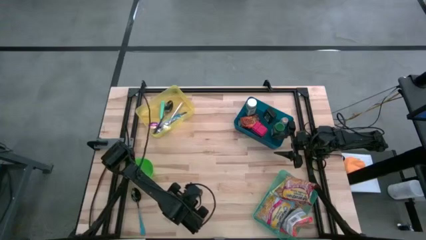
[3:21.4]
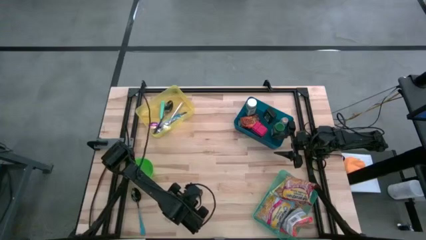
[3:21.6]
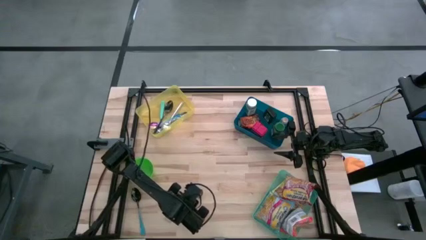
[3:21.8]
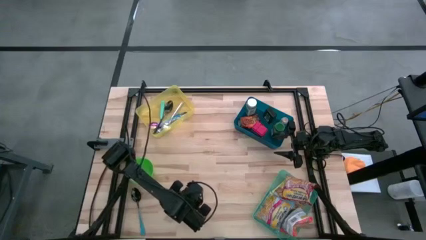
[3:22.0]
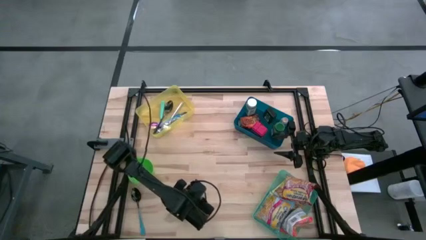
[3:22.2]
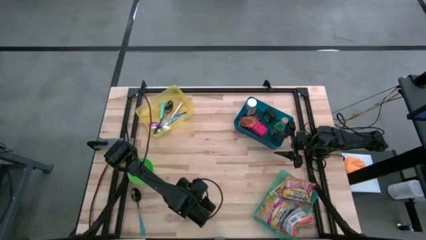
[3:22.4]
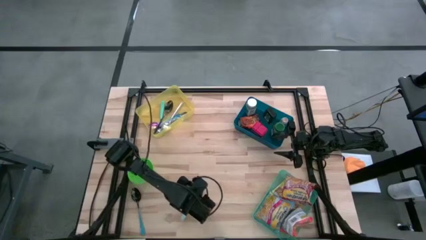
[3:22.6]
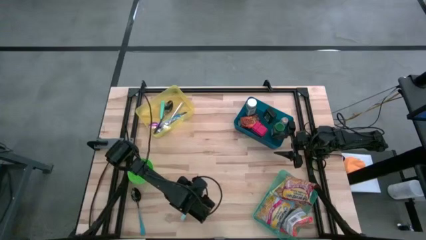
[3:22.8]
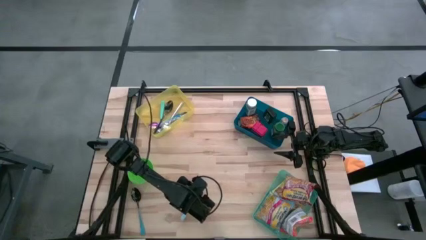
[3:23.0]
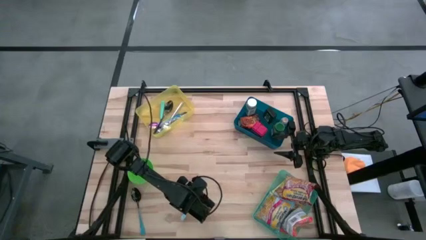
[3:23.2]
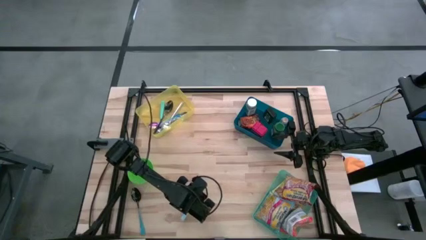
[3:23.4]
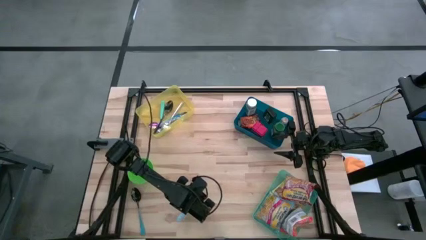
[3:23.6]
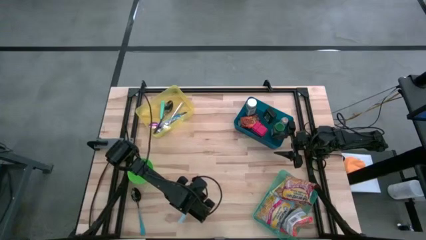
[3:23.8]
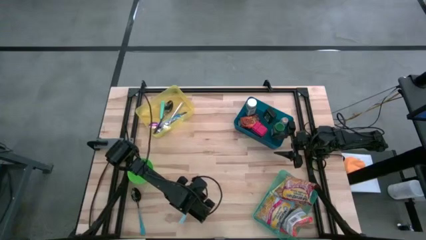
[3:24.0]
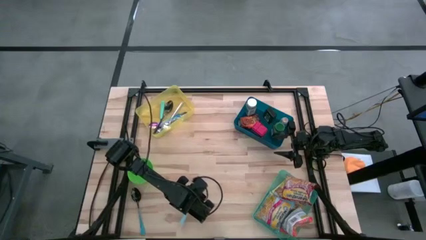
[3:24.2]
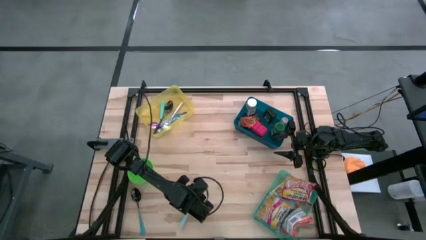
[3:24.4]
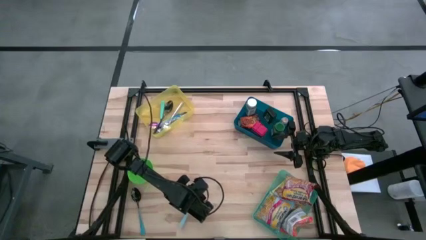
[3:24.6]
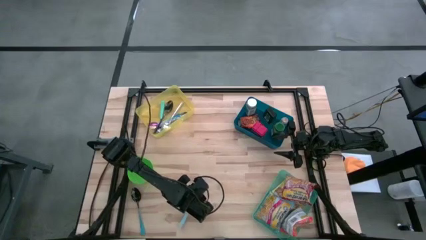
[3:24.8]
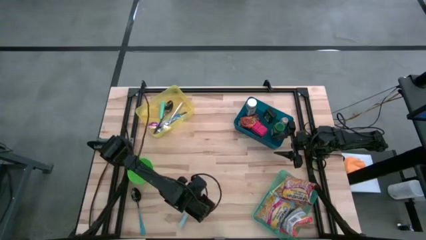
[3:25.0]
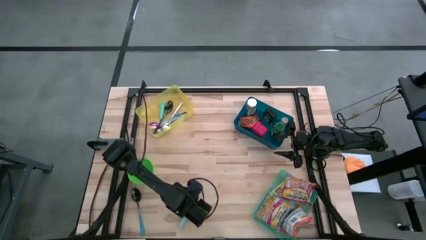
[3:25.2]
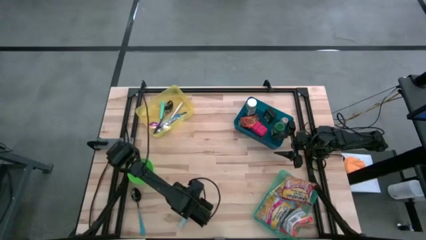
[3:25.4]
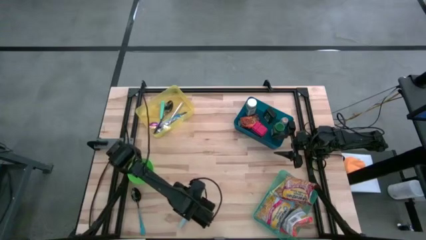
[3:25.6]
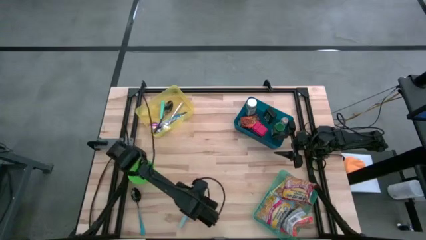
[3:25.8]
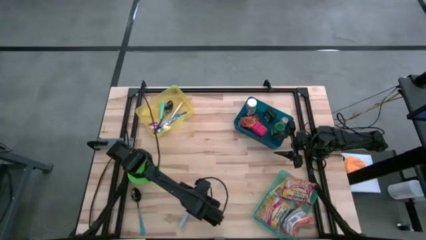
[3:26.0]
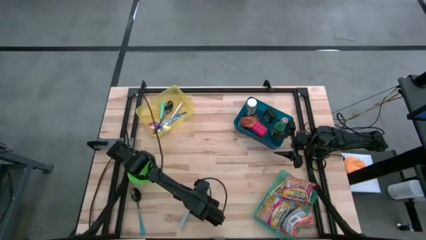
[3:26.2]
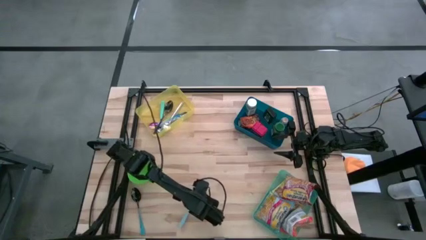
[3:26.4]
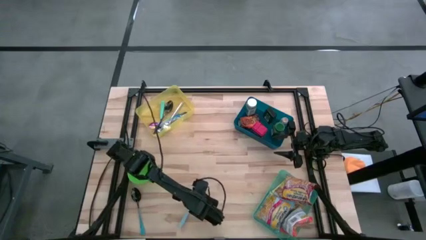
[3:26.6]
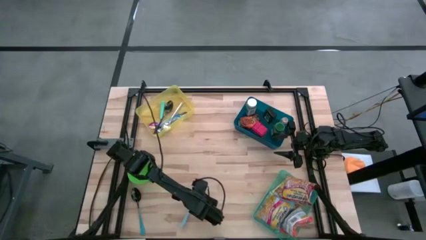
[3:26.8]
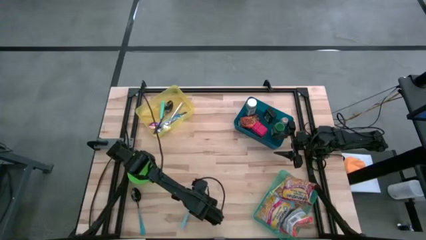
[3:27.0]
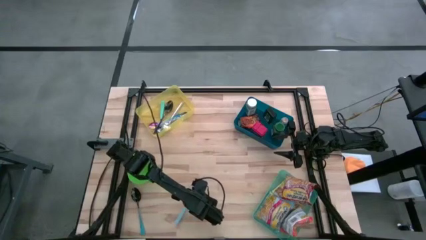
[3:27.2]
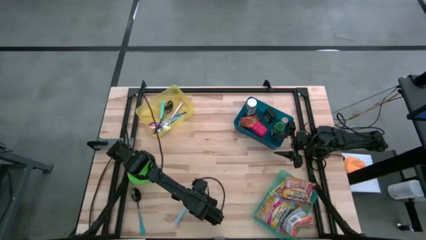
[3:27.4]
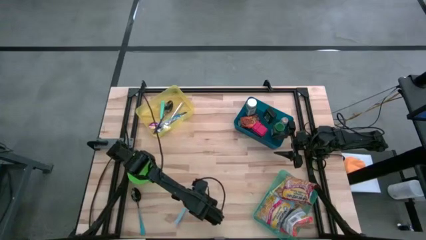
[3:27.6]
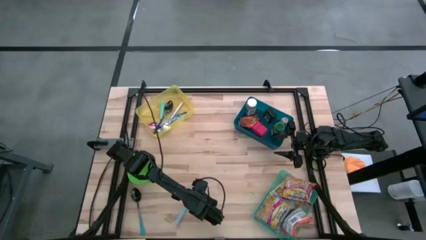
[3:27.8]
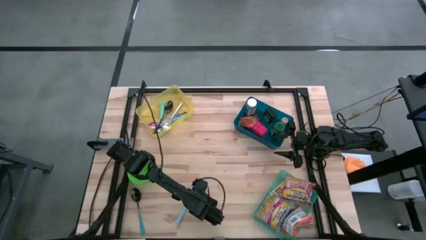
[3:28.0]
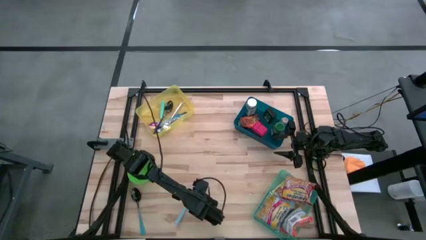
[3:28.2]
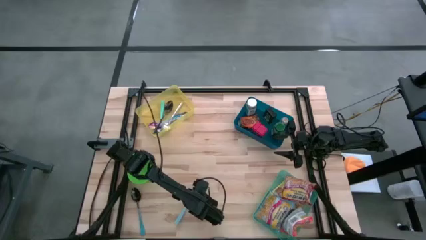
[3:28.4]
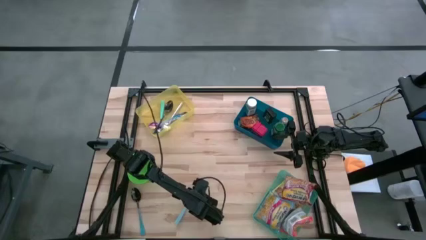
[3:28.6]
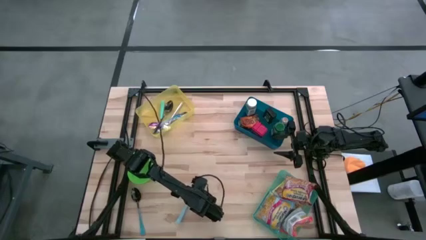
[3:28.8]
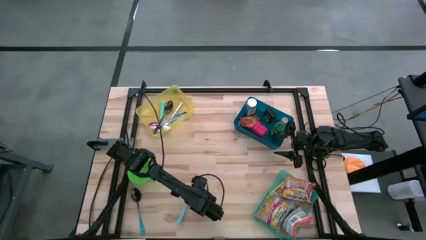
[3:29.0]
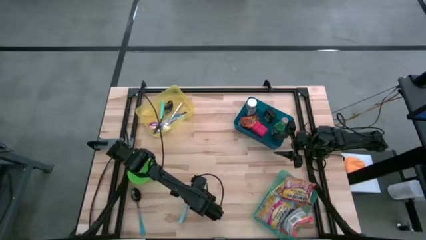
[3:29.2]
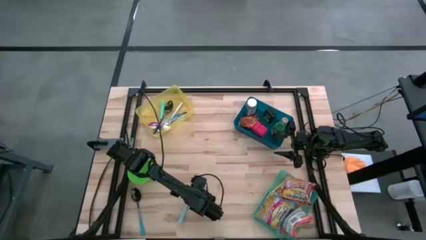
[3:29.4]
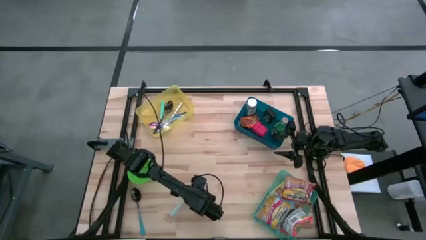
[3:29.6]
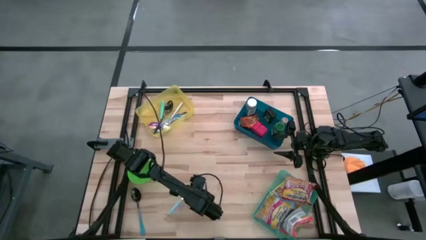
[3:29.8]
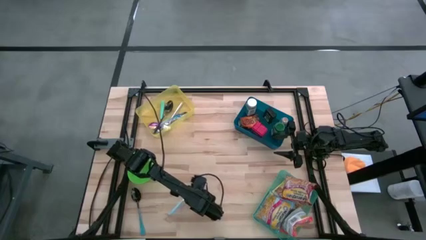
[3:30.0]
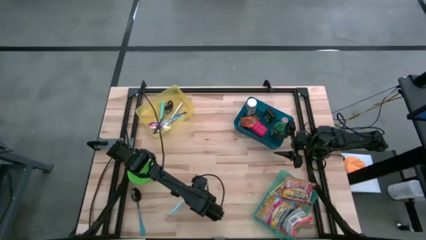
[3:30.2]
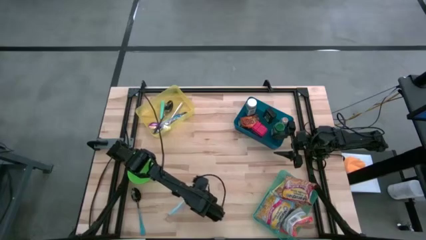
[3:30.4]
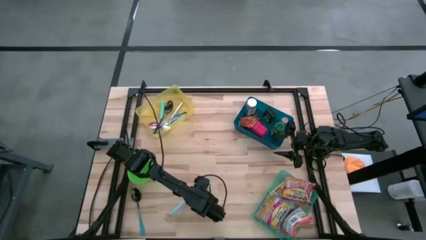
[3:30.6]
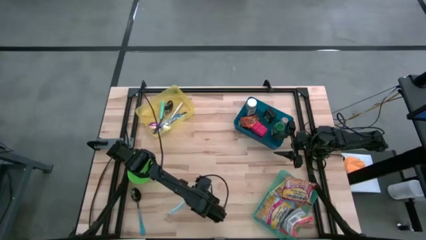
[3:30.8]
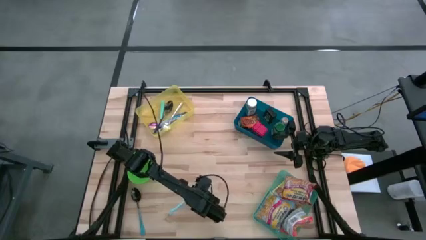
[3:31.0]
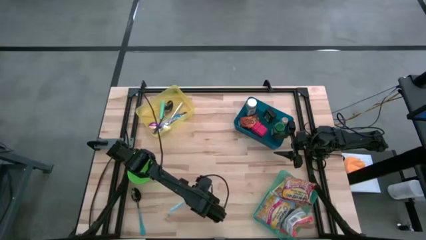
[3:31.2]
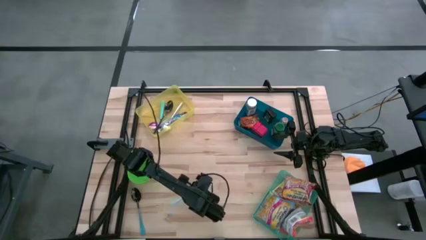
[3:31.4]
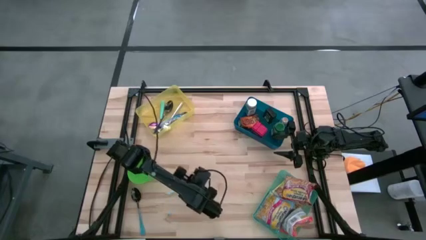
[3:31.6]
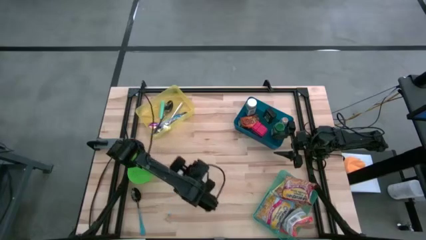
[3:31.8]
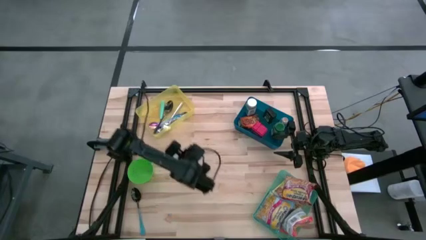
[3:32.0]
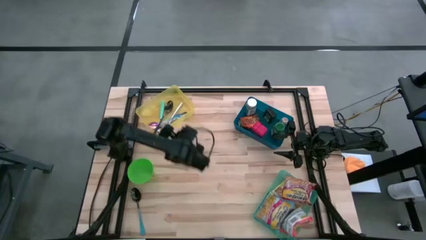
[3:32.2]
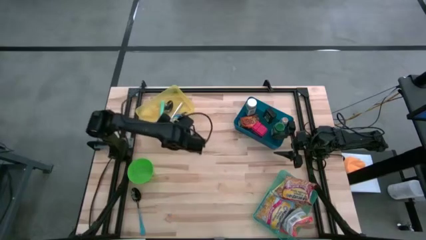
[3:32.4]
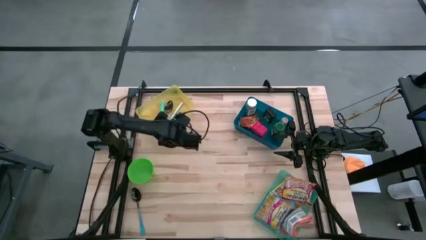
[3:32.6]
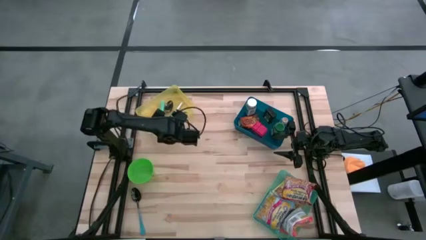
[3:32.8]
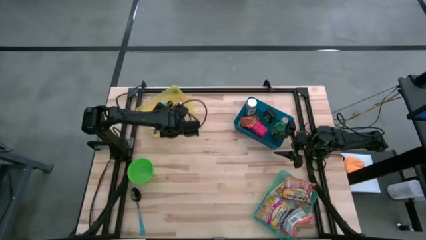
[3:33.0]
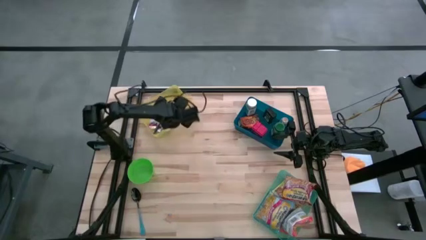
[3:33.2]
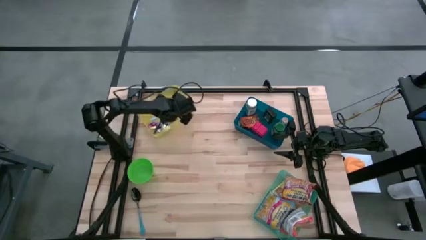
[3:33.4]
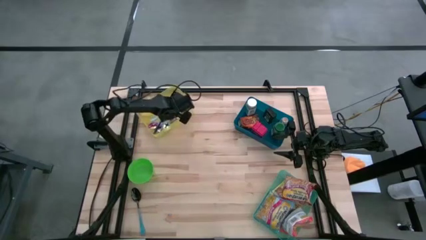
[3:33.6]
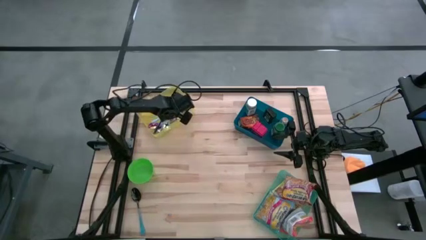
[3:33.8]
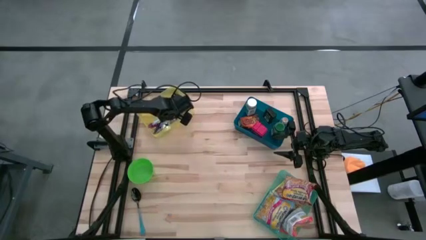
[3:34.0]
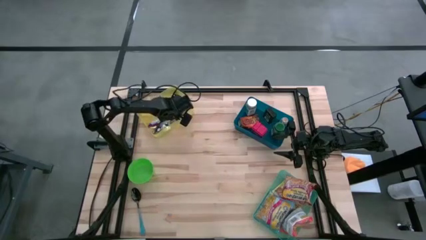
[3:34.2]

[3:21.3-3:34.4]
Put the blue spoon into the yellow bin
